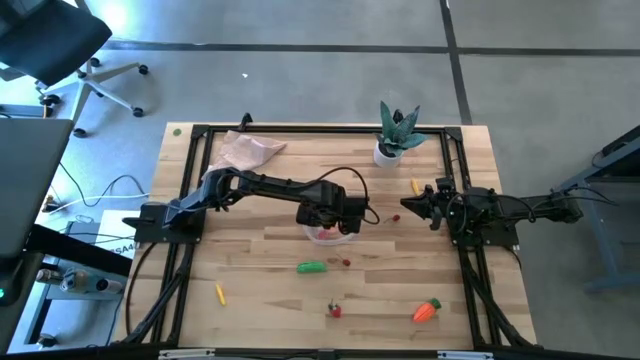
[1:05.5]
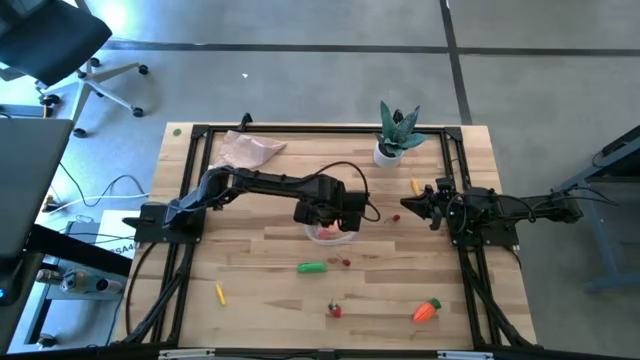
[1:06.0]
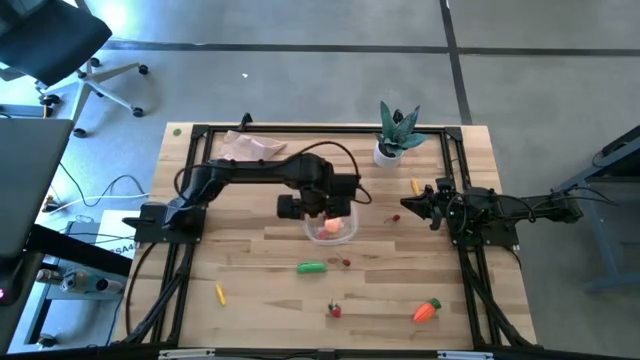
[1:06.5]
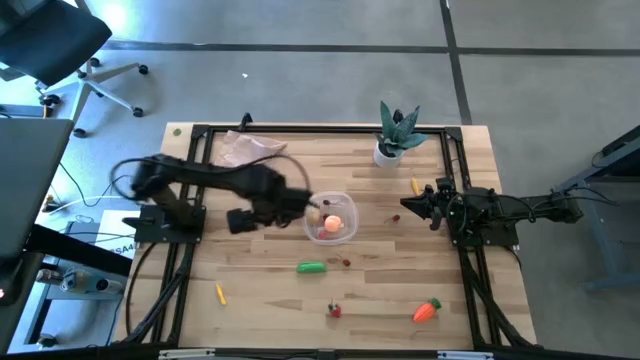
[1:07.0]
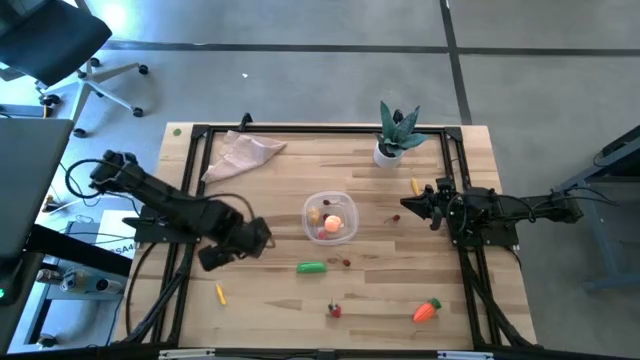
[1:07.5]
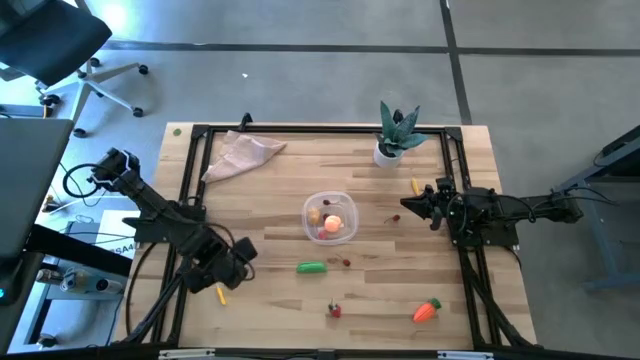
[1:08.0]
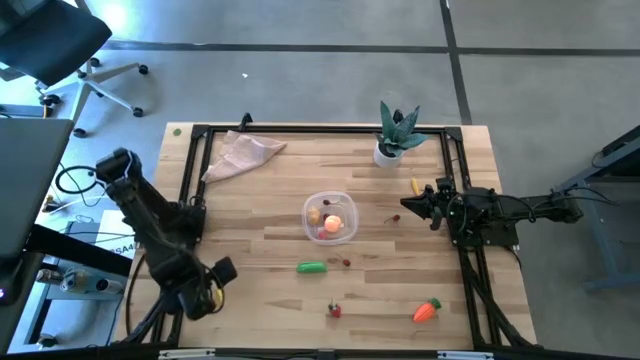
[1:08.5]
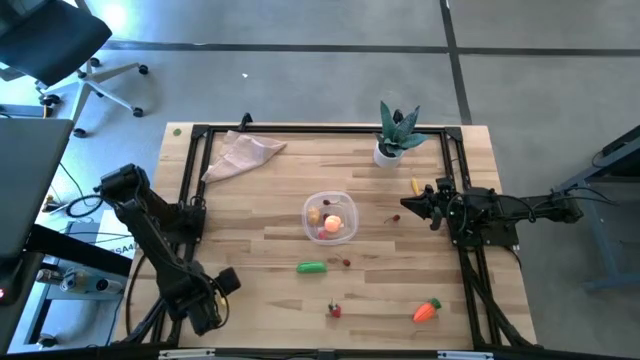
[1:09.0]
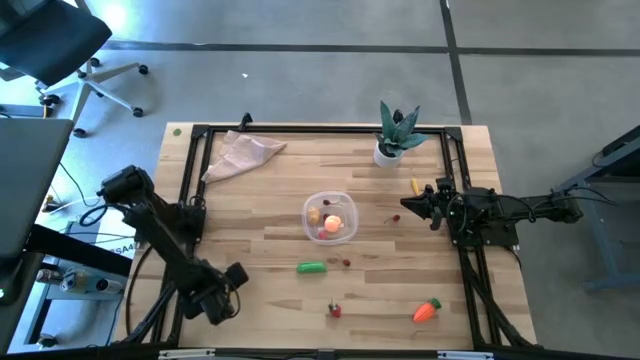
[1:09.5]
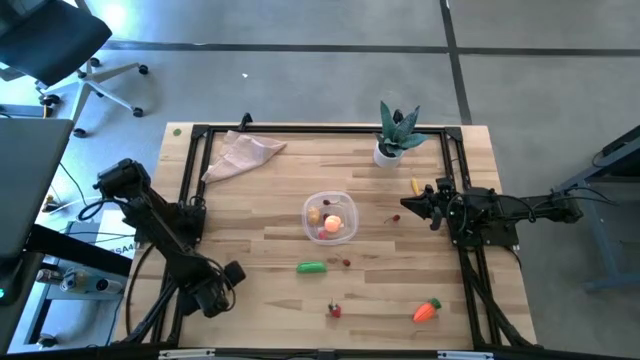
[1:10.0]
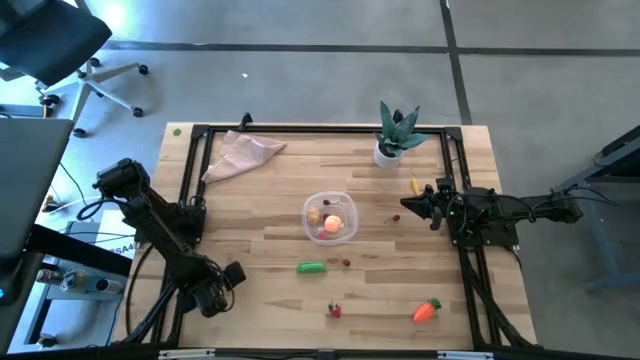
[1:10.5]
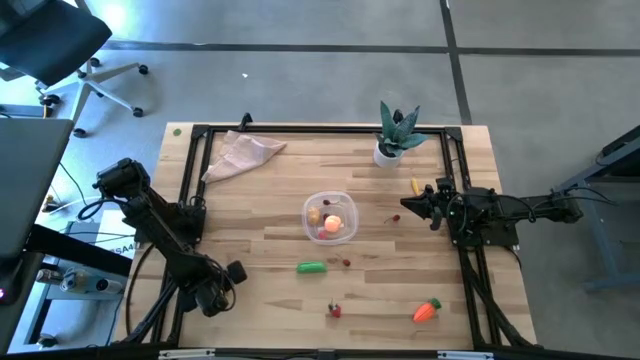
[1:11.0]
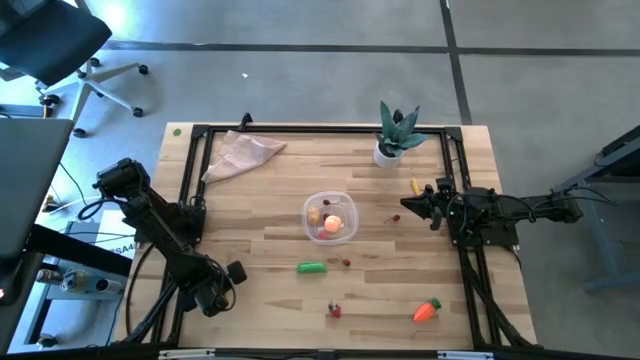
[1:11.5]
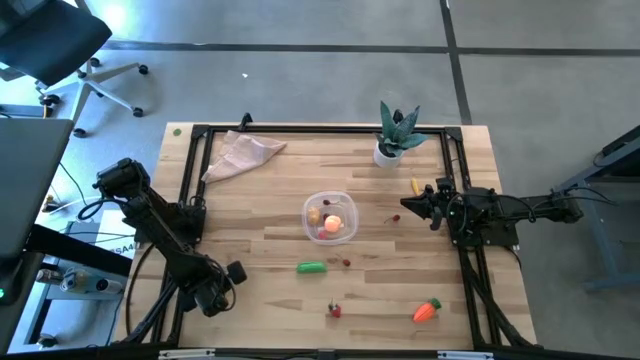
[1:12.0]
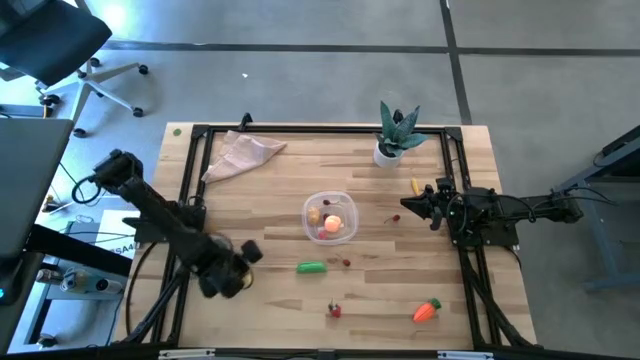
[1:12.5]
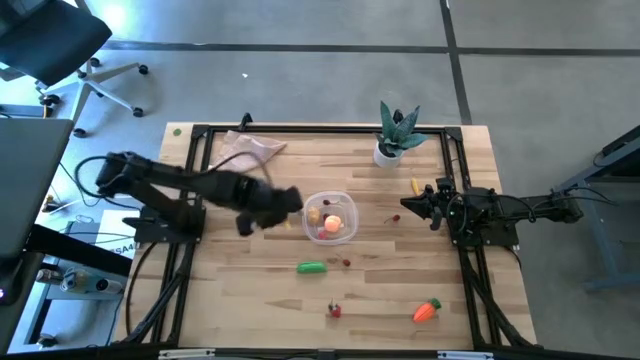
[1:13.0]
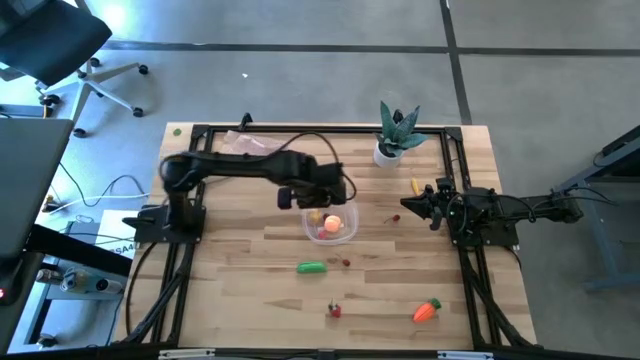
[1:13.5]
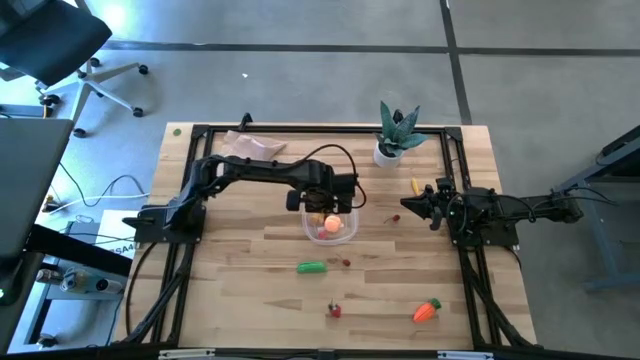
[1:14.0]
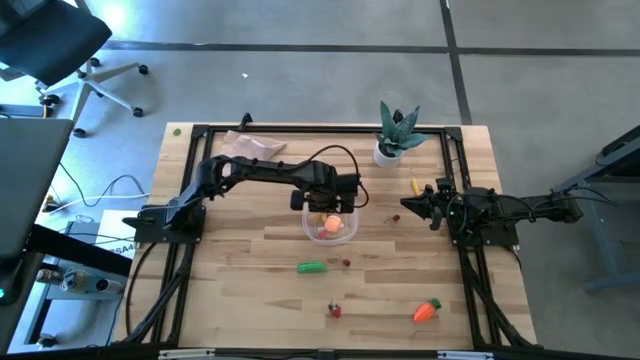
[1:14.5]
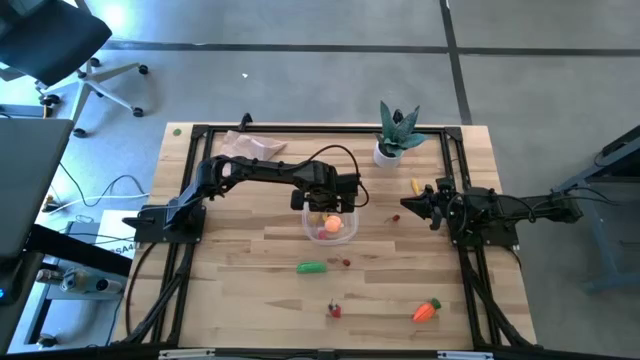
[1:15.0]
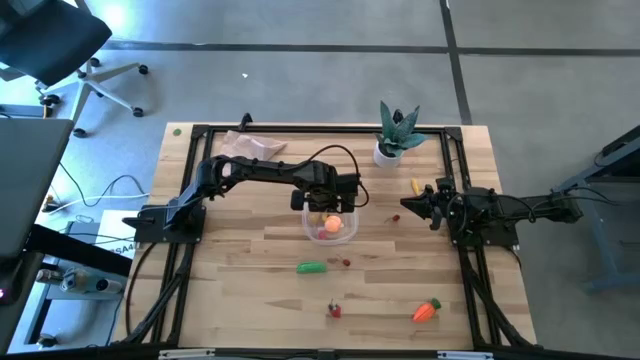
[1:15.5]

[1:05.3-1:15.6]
Task: Pick and placing Produce into tupperware
Put the bottom corn into the transparent bin

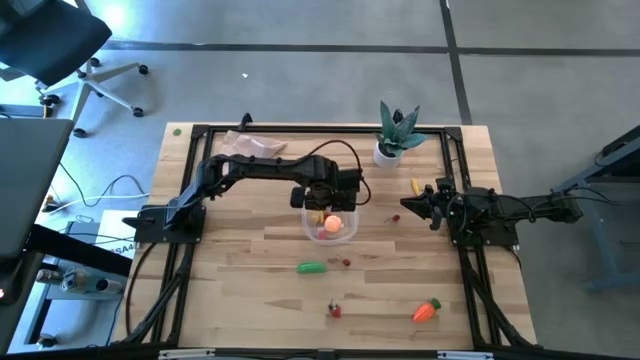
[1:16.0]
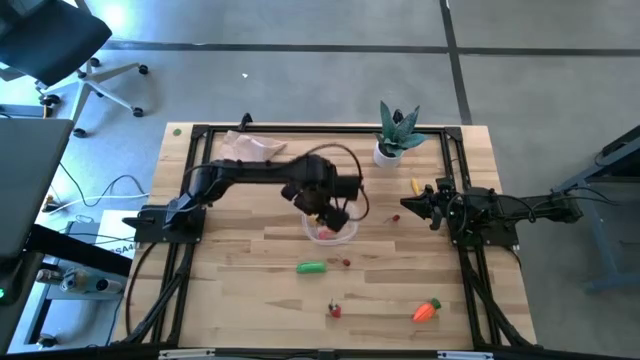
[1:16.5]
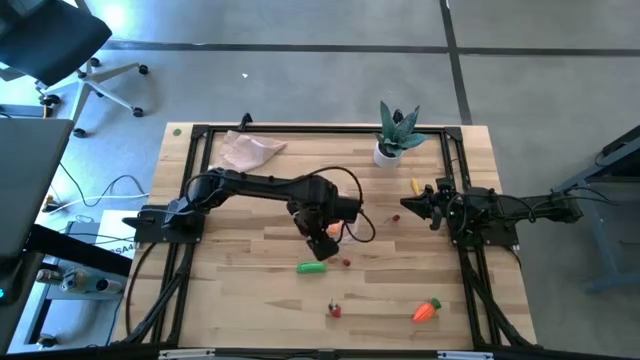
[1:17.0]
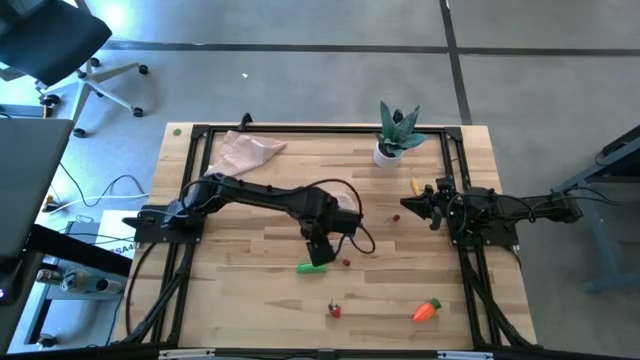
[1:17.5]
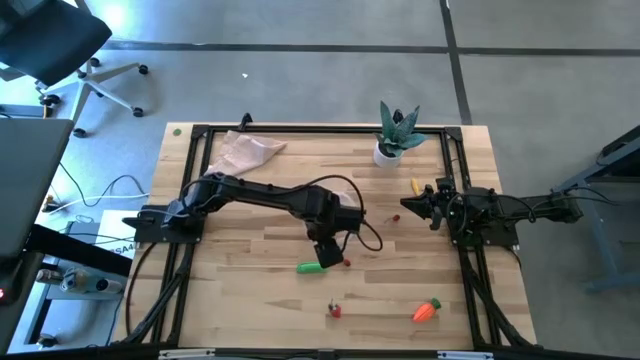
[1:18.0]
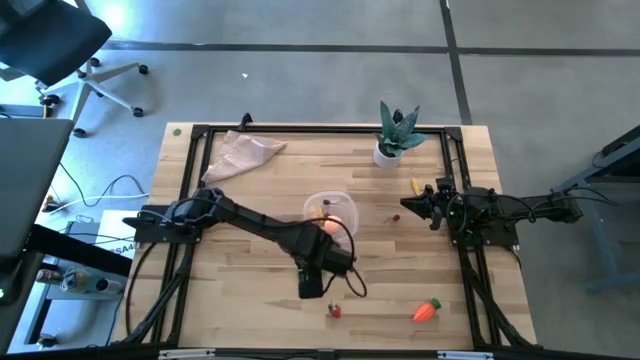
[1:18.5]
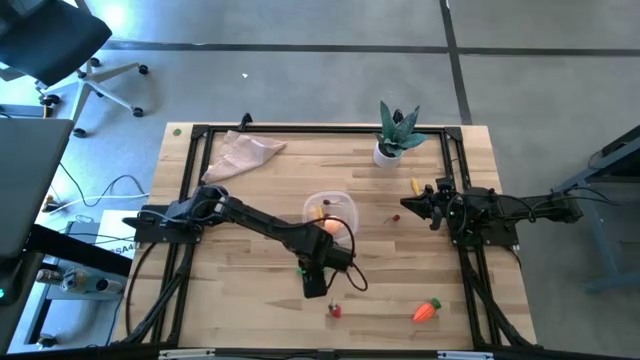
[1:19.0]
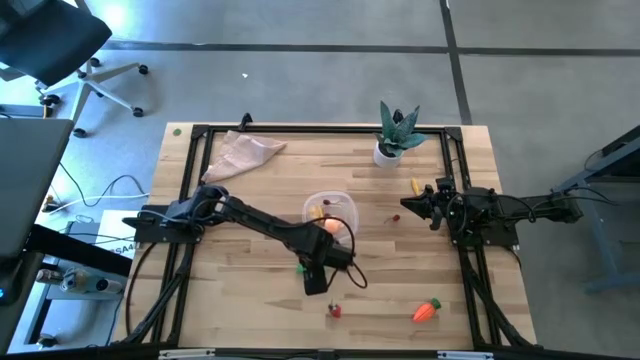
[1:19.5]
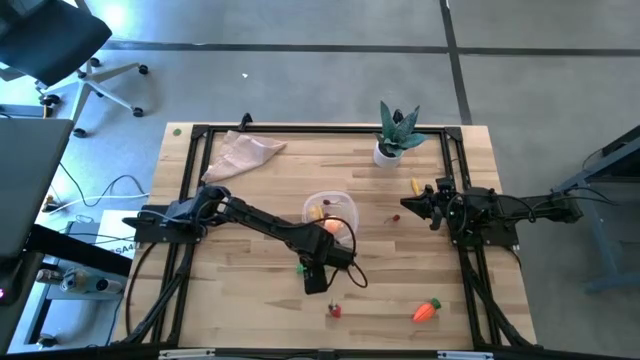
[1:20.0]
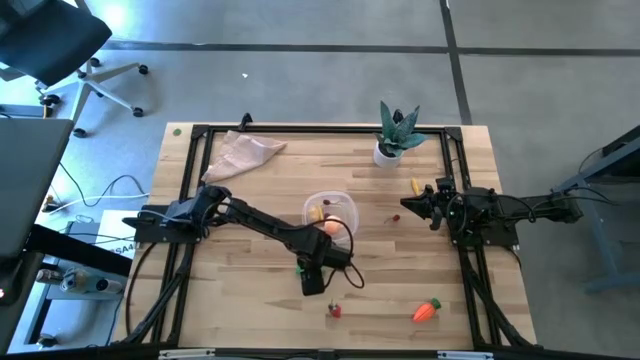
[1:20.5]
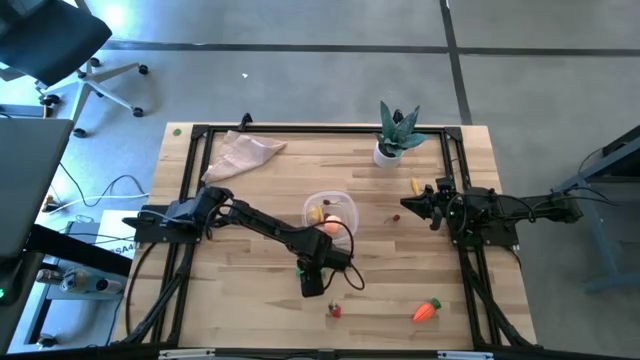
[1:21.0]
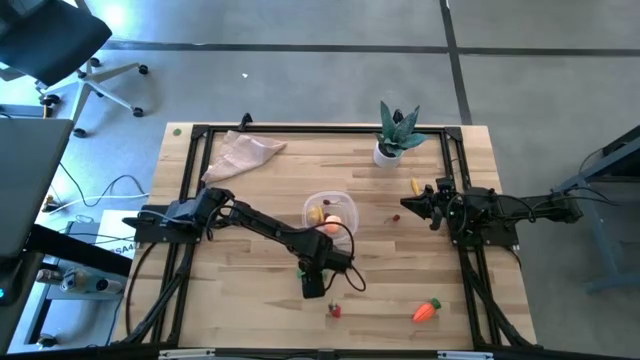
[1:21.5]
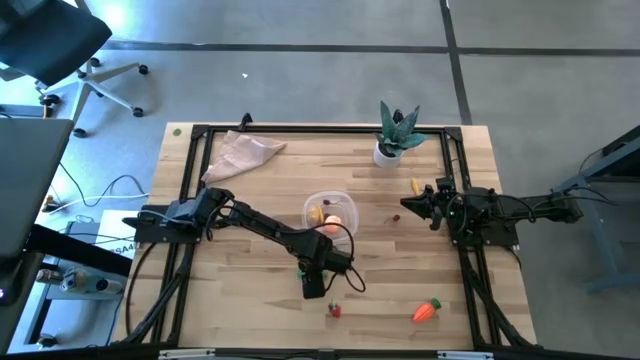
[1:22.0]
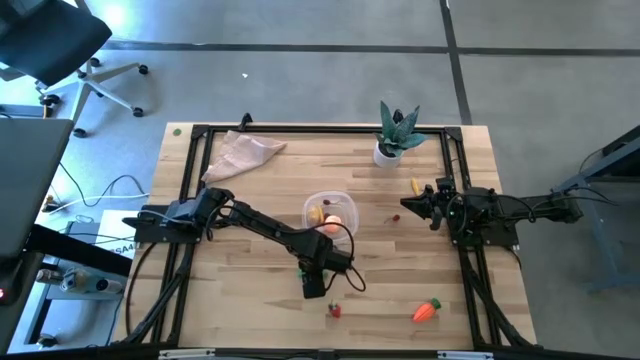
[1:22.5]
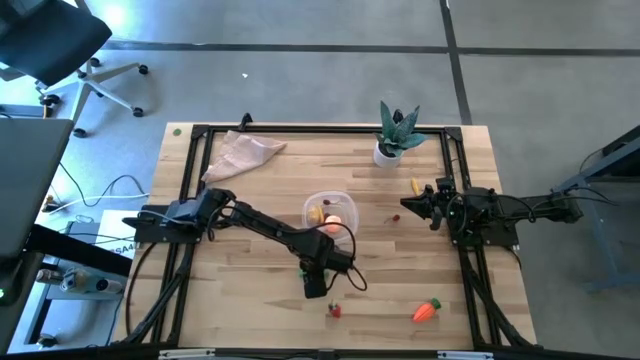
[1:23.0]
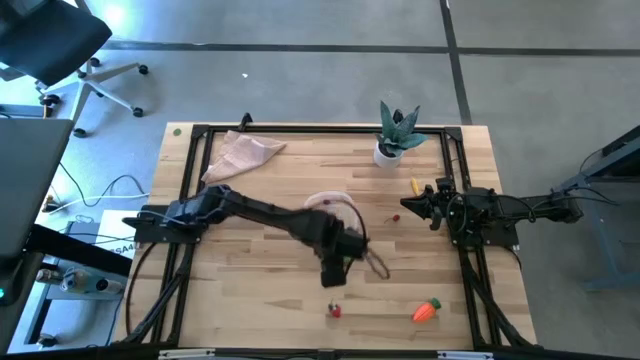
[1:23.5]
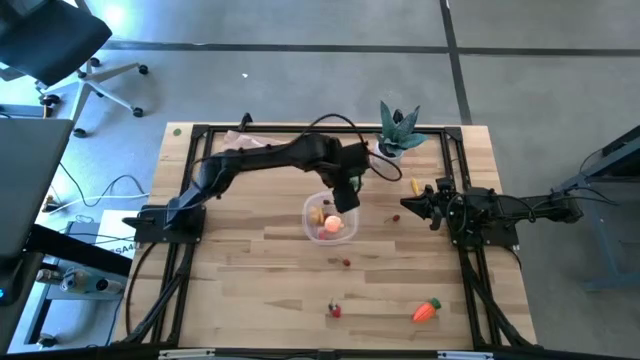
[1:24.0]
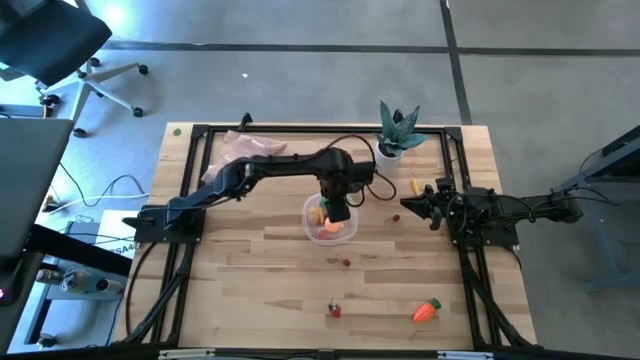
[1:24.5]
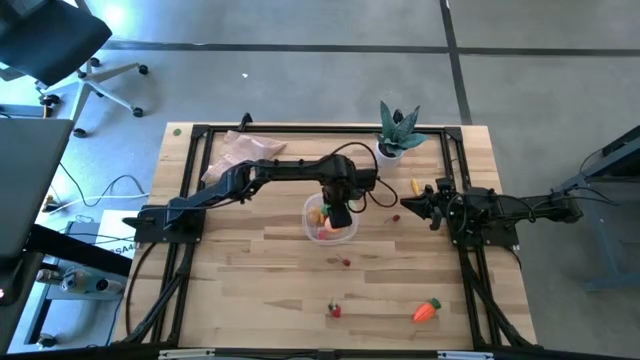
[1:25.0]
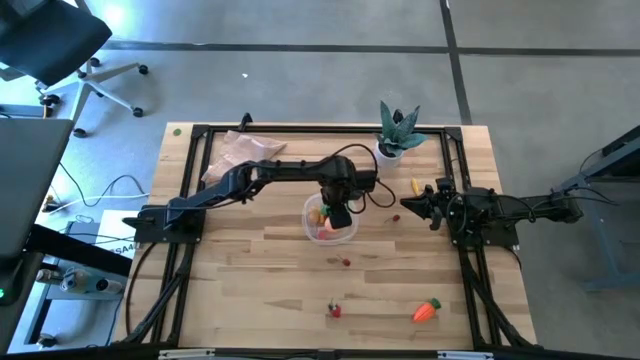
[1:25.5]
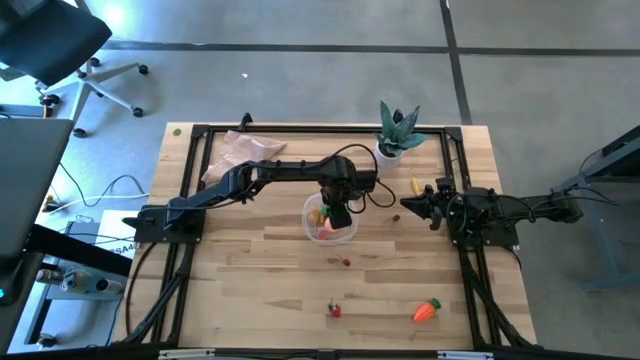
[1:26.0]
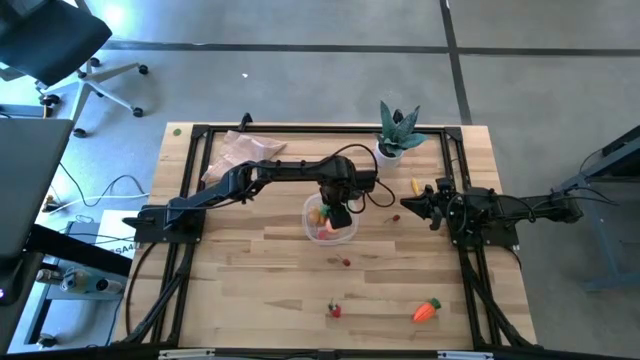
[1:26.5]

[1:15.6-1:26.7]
Put the green pea into the transparent bin
